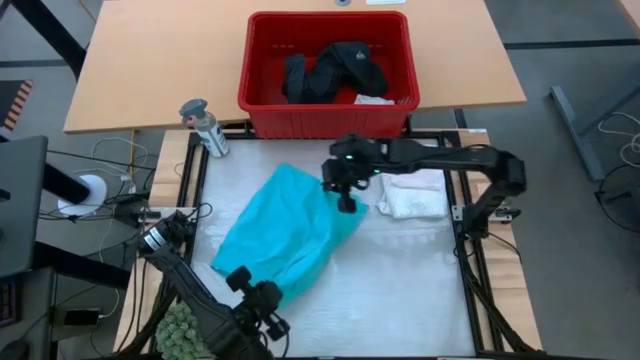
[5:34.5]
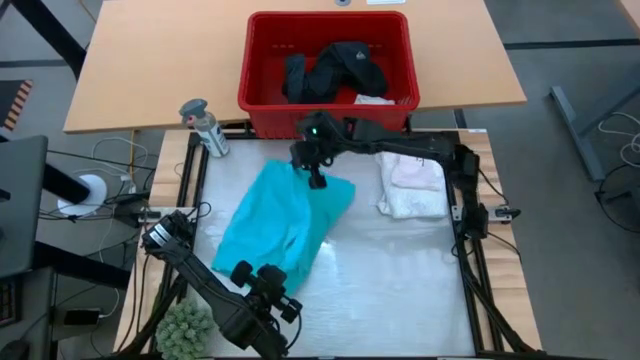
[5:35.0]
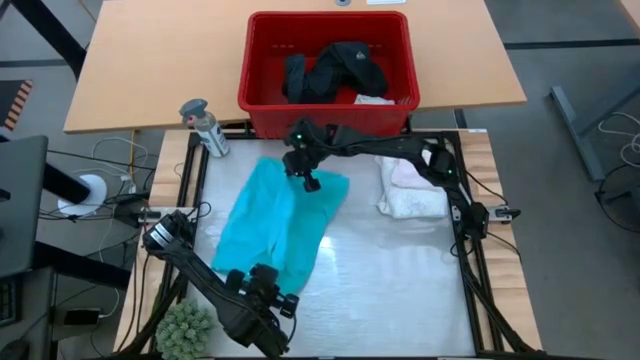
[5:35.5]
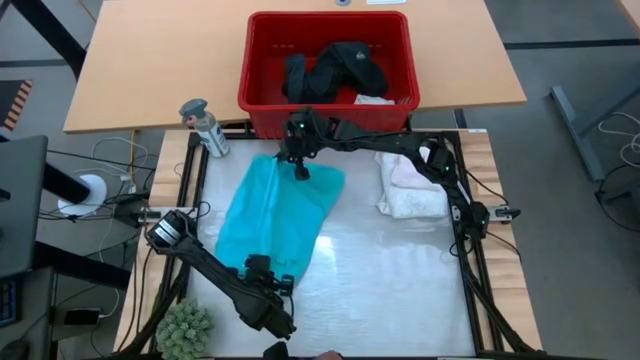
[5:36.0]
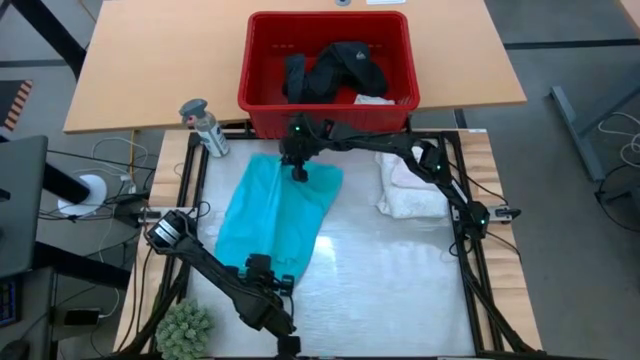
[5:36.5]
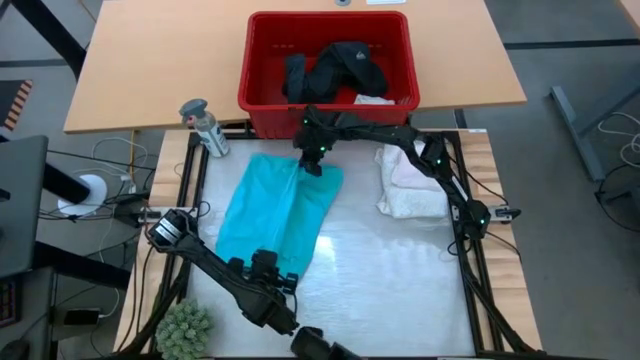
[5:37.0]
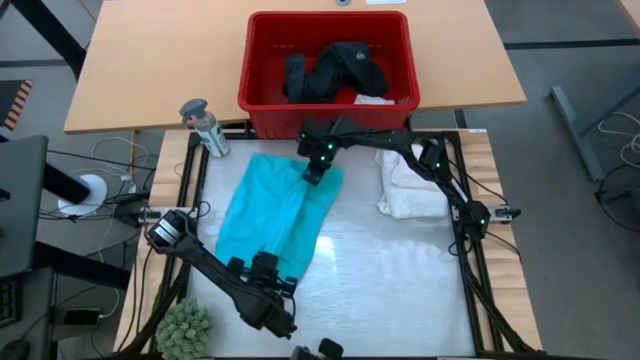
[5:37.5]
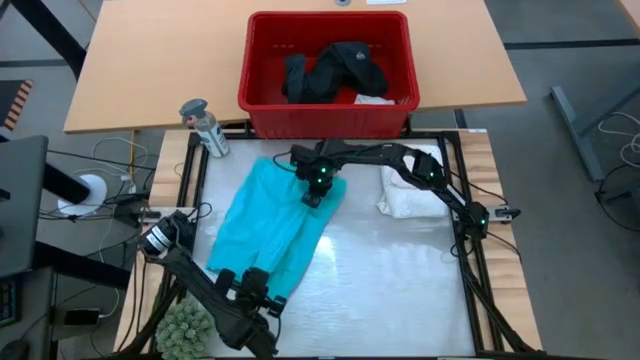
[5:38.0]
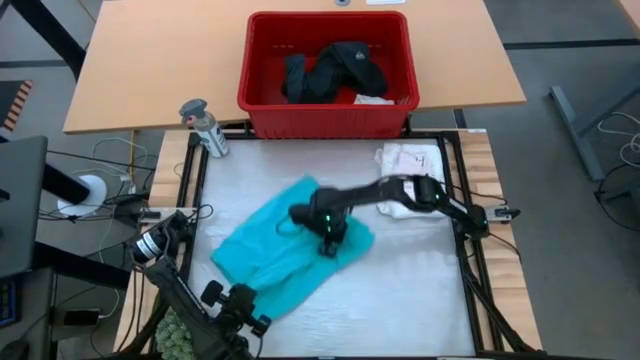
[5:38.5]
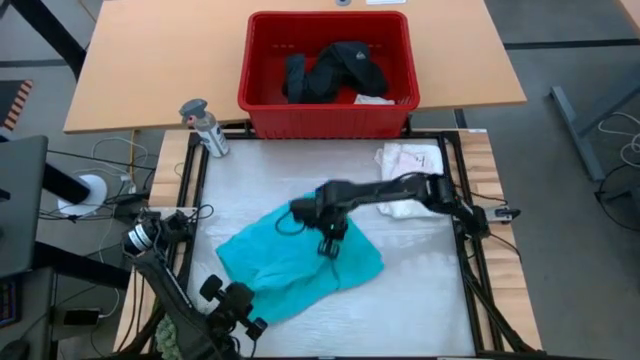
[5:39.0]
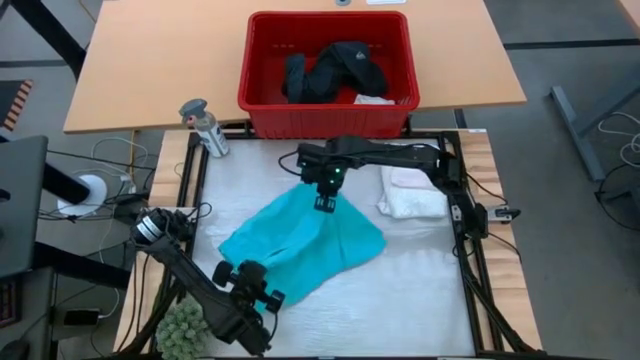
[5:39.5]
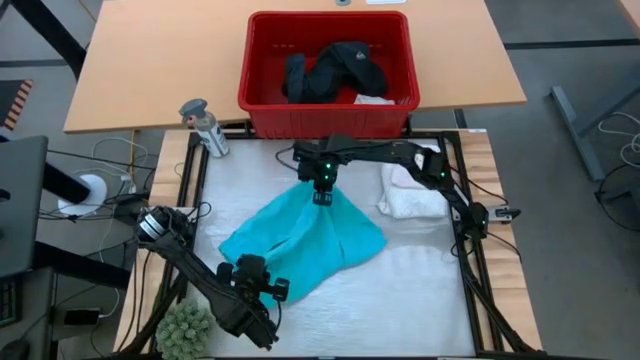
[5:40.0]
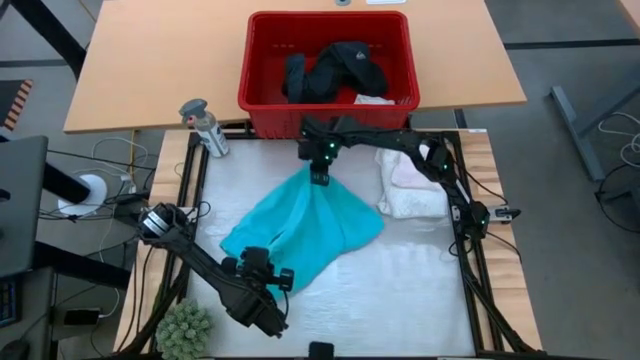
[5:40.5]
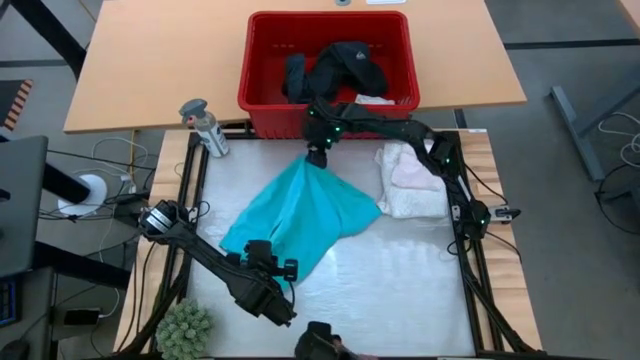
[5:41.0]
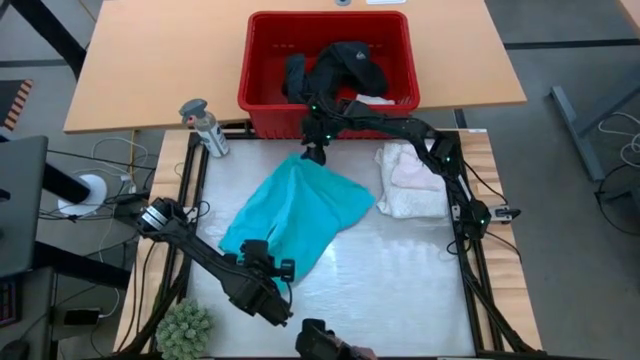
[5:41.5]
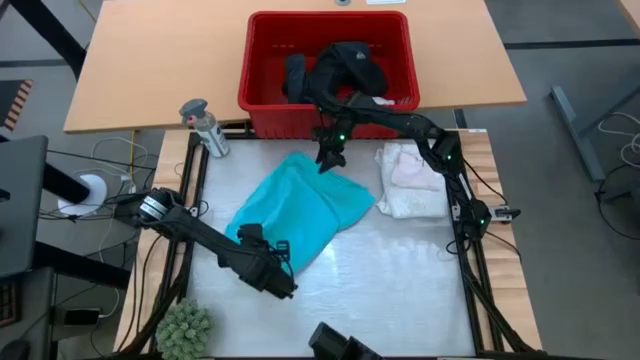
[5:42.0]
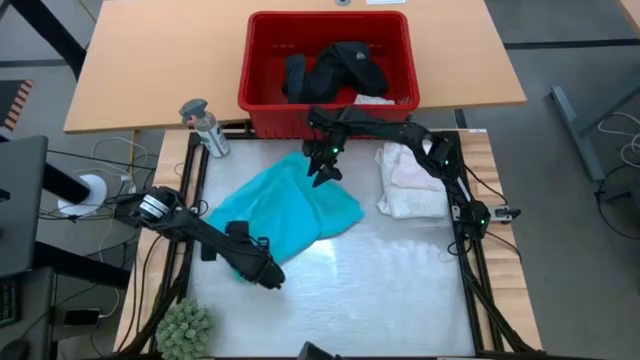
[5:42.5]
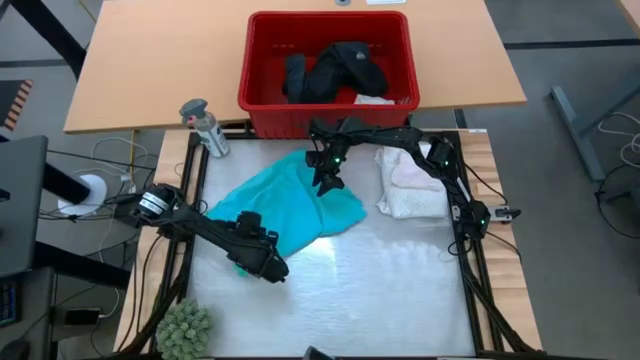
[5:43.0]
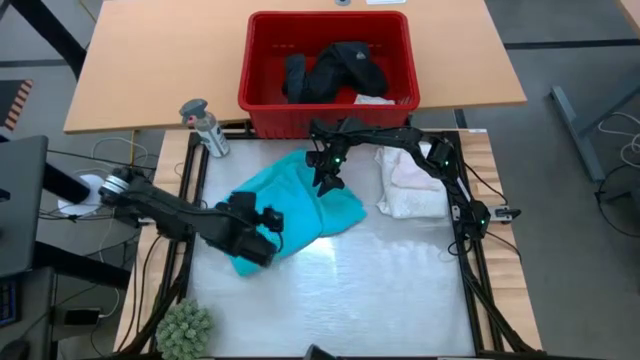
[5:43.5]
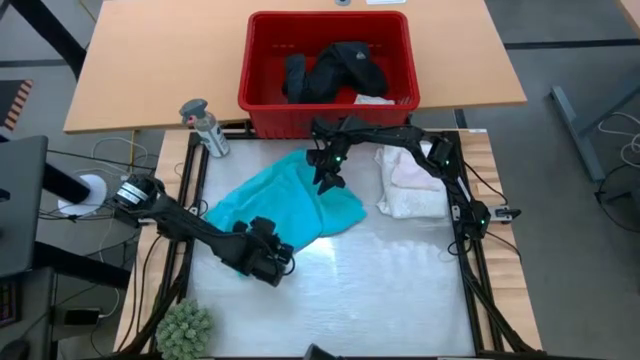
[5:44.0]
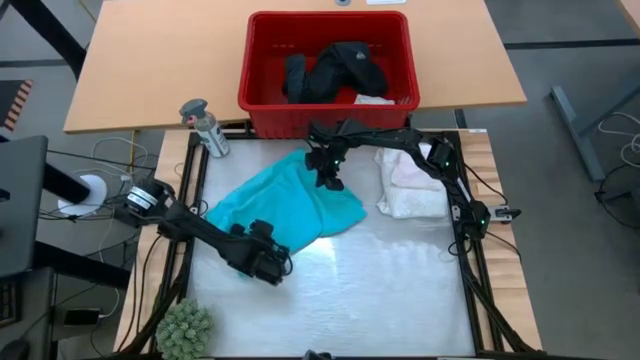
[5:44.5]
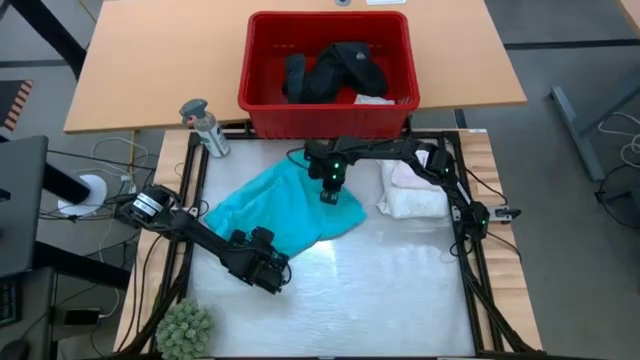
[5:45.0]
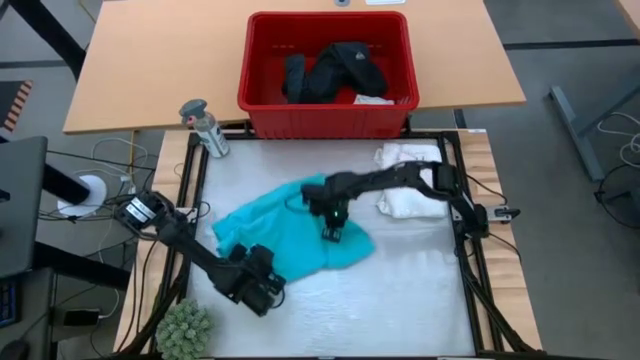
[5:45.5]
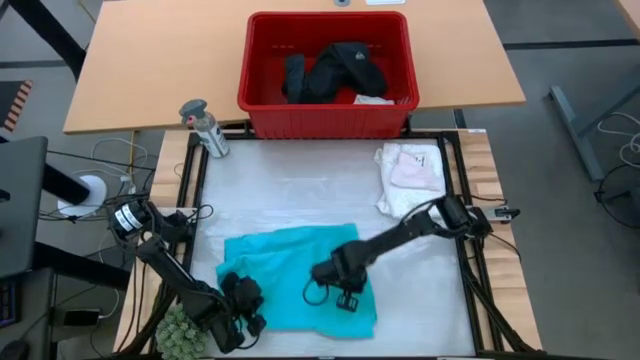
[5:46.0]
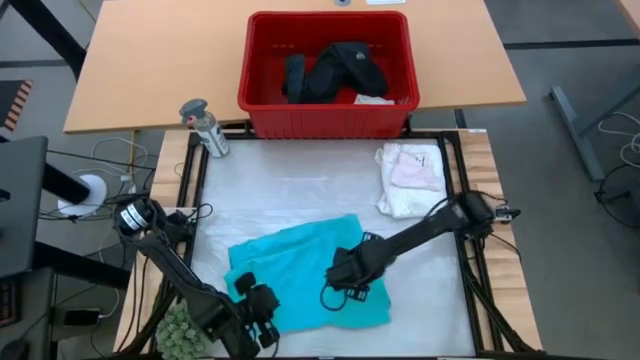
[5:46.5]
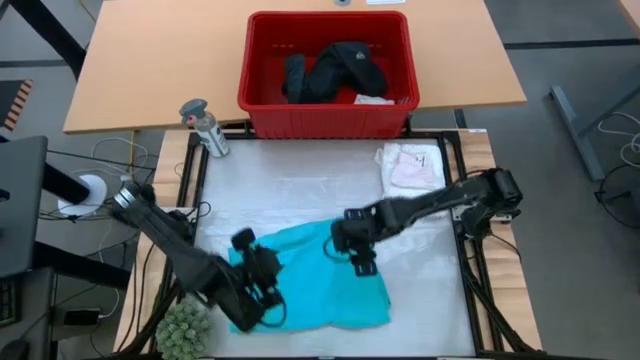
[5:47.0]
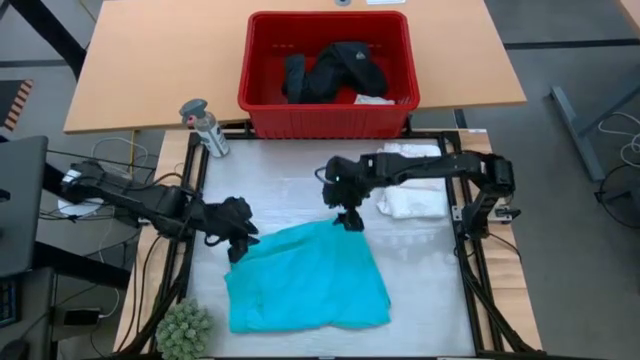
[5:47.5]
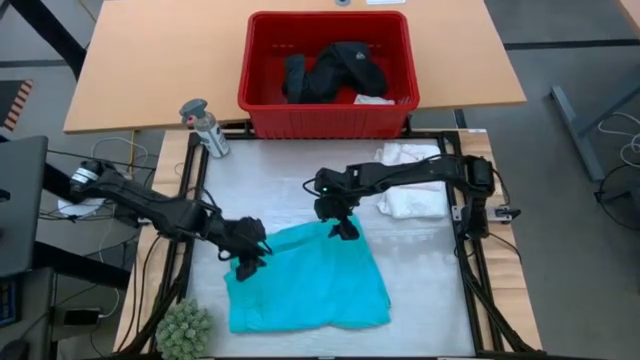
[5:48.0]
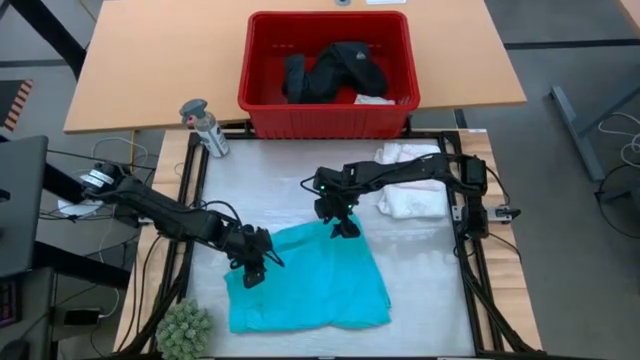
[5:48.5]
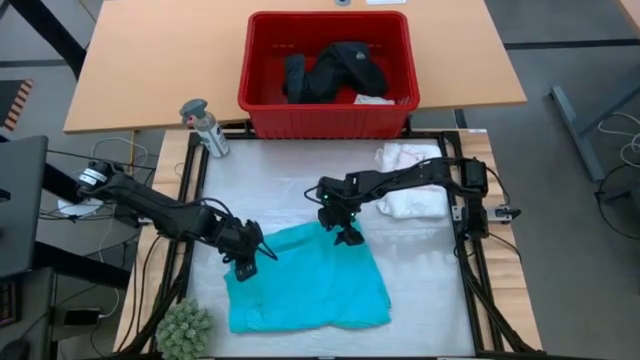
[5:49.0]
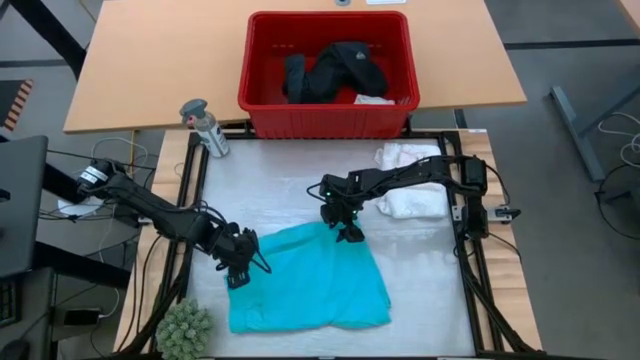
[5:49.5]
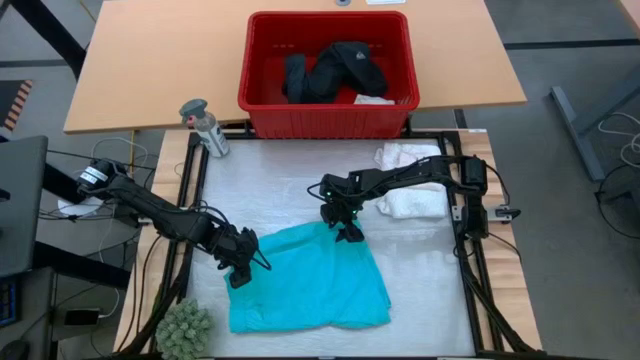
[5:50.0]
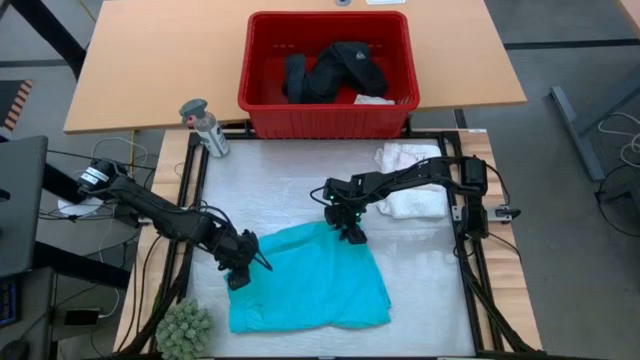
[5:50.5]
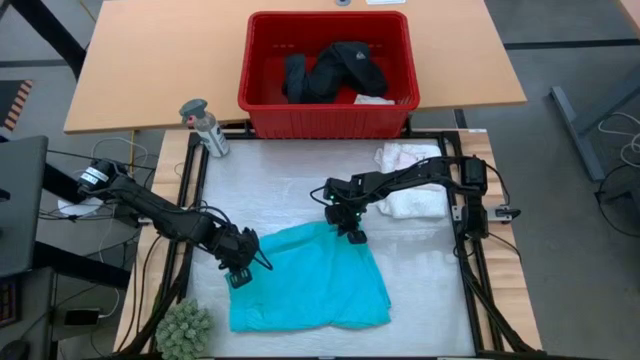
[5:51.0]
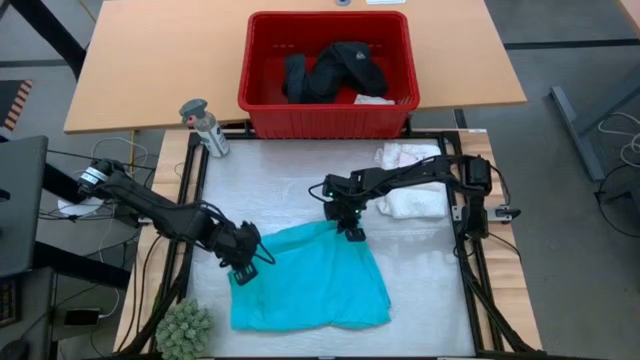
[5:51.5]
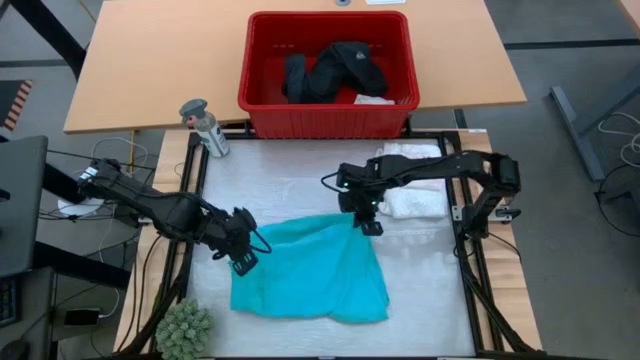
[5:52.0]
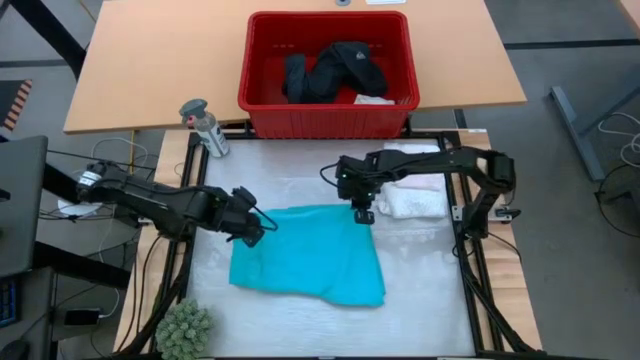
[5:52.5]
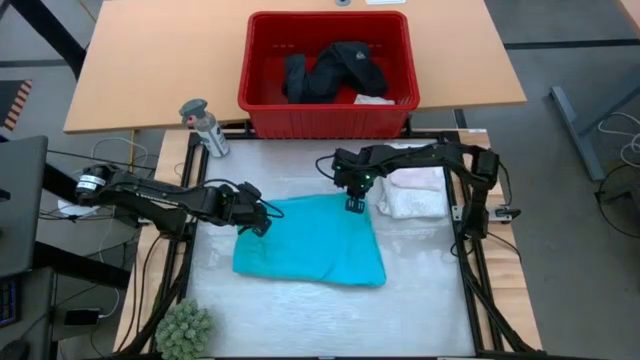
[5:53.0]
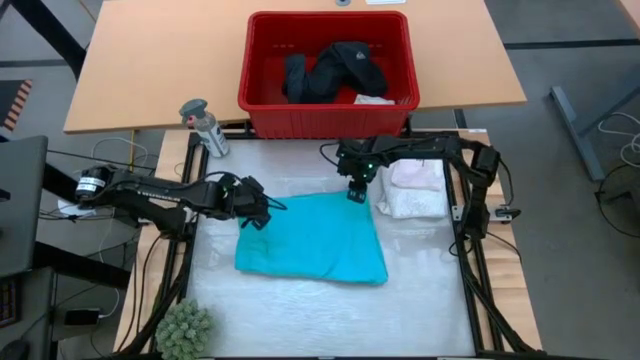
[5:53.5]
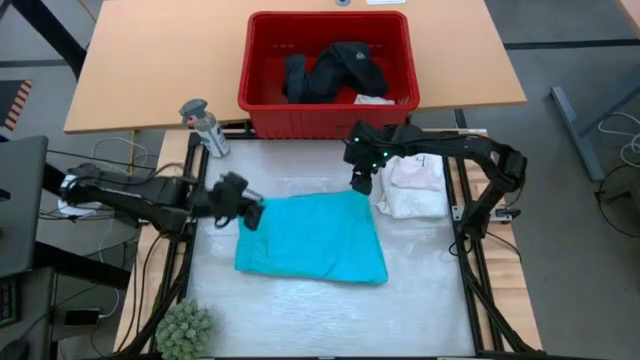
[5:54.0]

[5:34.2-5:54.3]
Task: Fold Laundry from Bin
Fold the light blue shorts
